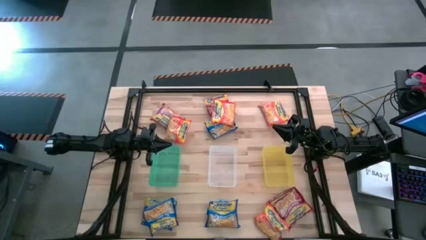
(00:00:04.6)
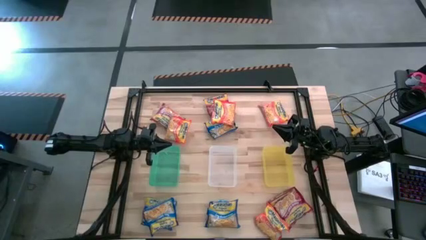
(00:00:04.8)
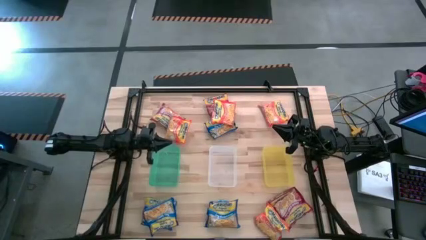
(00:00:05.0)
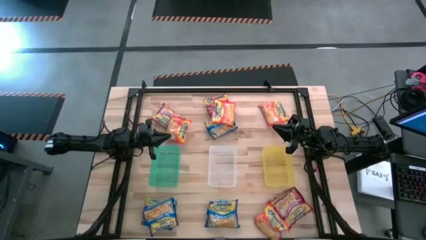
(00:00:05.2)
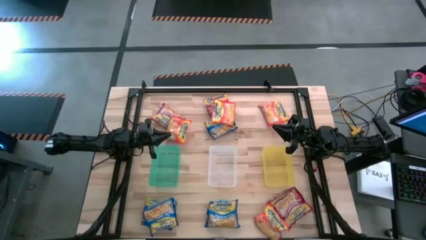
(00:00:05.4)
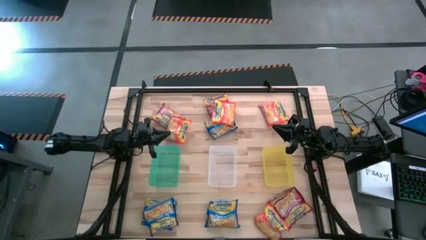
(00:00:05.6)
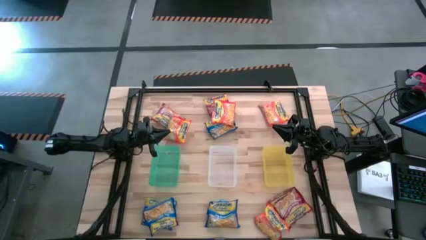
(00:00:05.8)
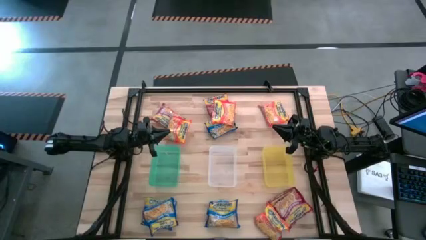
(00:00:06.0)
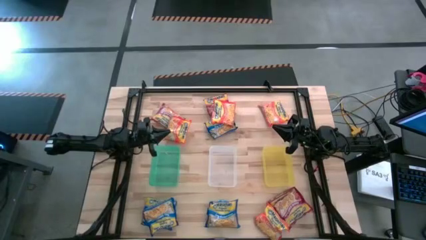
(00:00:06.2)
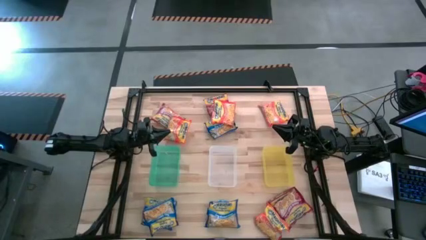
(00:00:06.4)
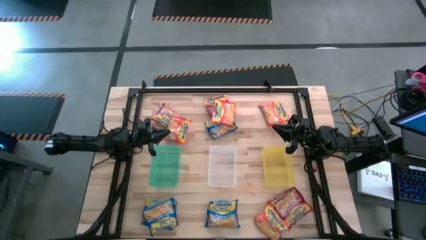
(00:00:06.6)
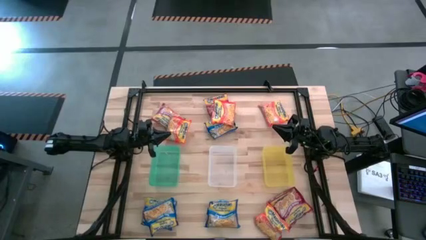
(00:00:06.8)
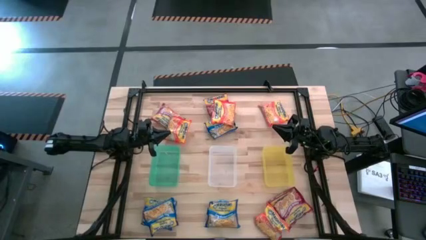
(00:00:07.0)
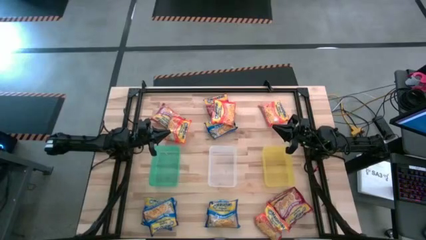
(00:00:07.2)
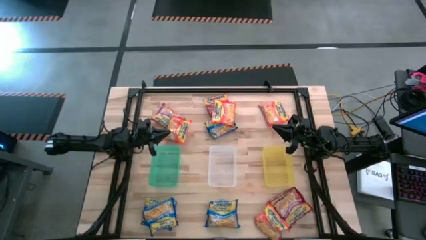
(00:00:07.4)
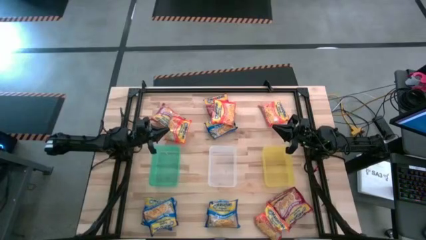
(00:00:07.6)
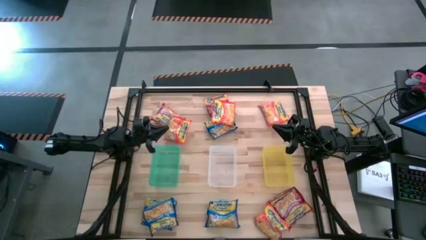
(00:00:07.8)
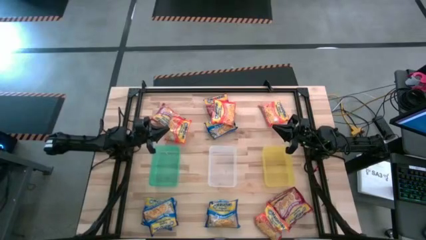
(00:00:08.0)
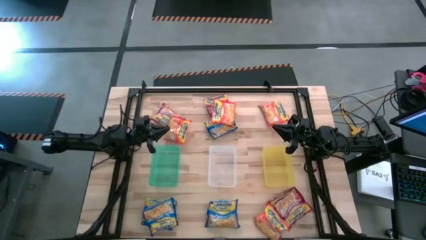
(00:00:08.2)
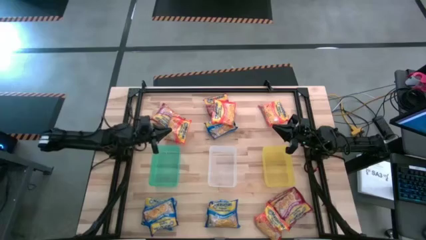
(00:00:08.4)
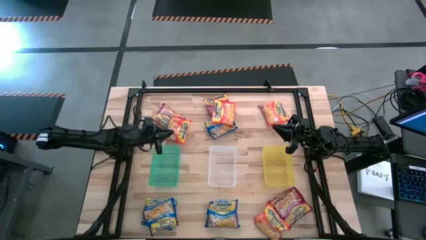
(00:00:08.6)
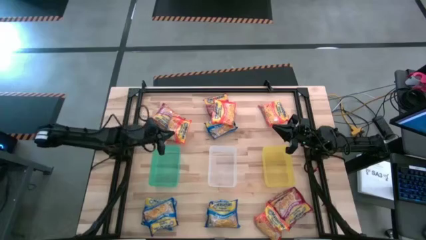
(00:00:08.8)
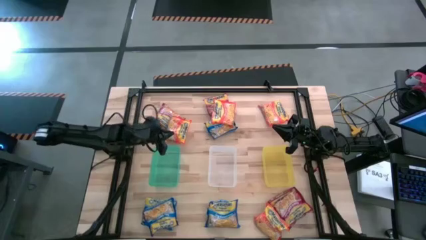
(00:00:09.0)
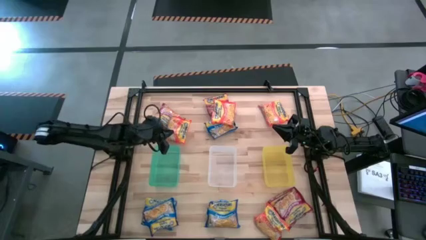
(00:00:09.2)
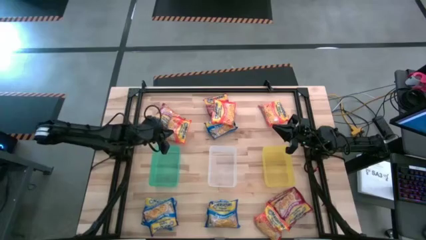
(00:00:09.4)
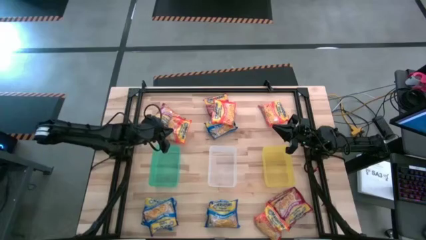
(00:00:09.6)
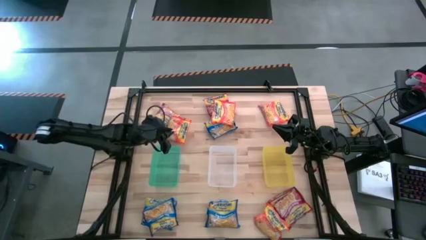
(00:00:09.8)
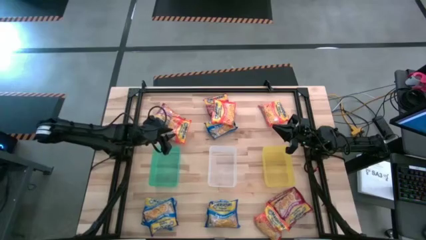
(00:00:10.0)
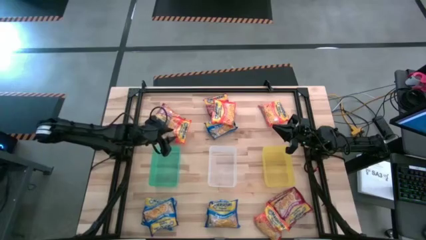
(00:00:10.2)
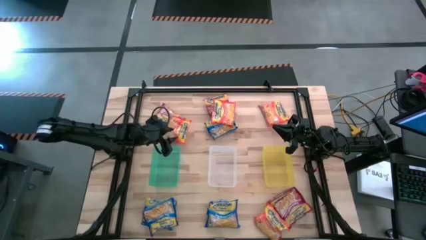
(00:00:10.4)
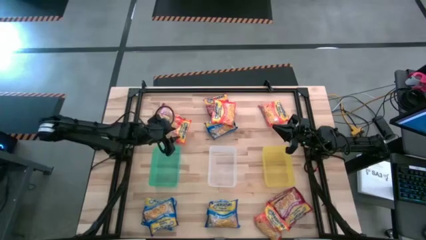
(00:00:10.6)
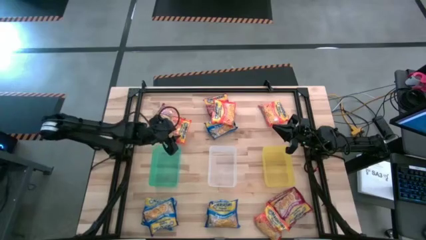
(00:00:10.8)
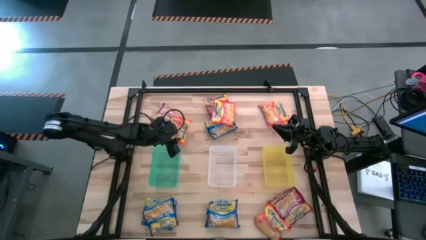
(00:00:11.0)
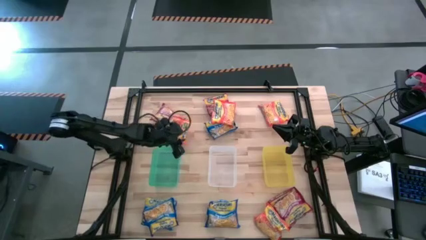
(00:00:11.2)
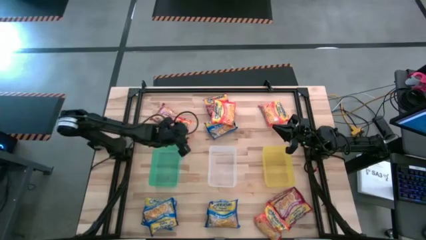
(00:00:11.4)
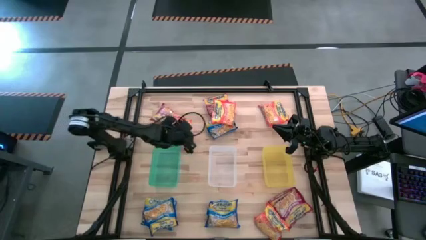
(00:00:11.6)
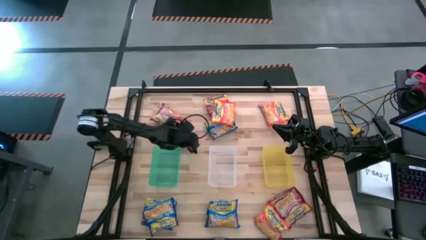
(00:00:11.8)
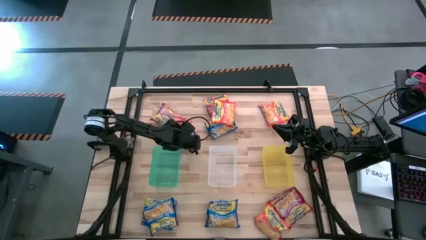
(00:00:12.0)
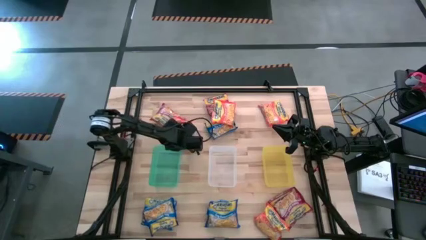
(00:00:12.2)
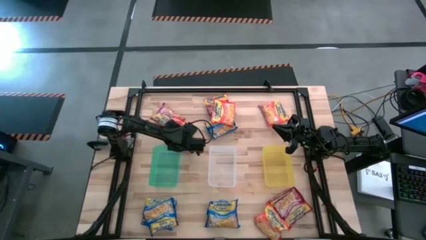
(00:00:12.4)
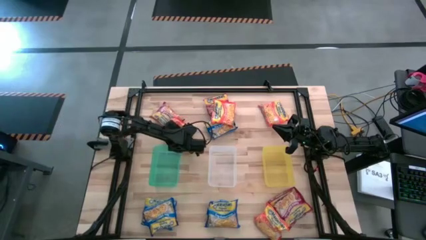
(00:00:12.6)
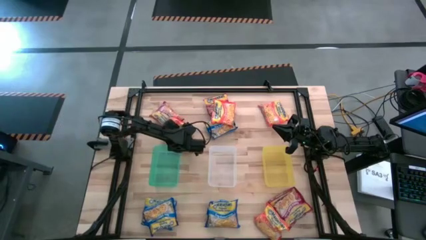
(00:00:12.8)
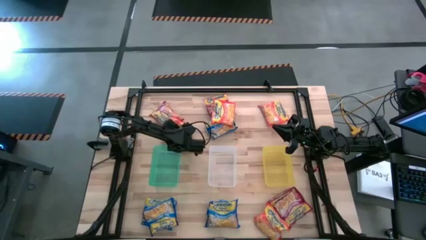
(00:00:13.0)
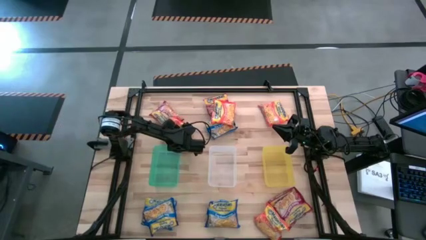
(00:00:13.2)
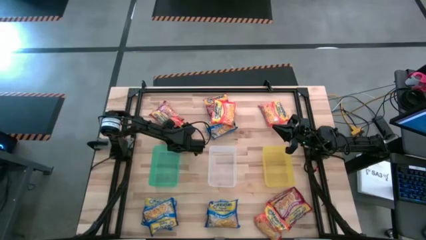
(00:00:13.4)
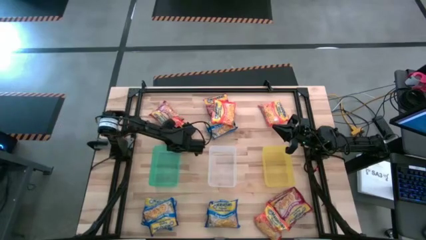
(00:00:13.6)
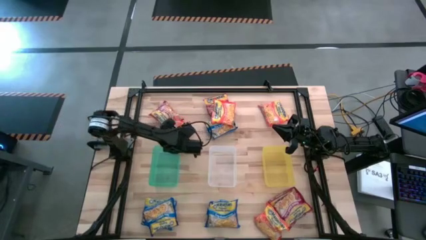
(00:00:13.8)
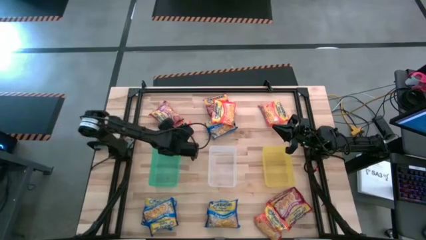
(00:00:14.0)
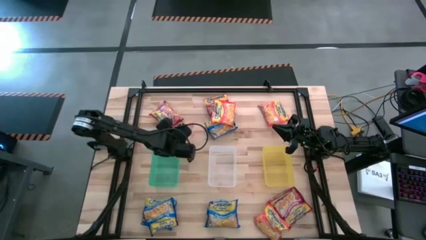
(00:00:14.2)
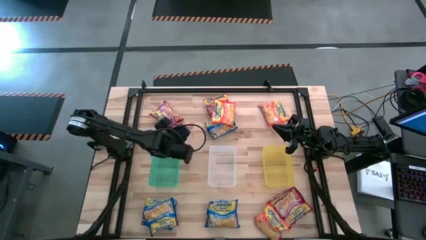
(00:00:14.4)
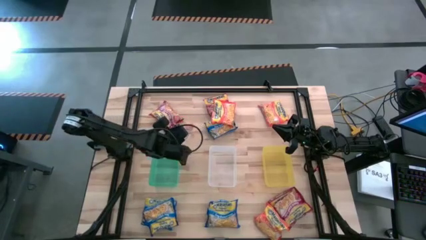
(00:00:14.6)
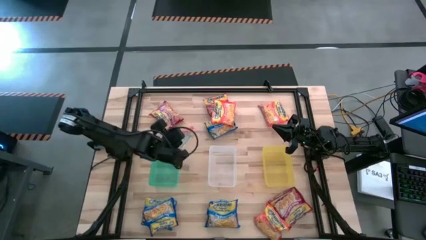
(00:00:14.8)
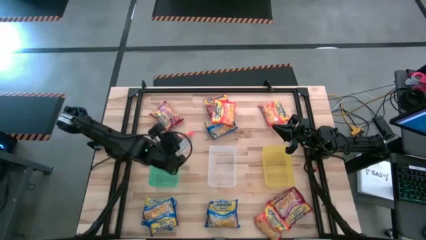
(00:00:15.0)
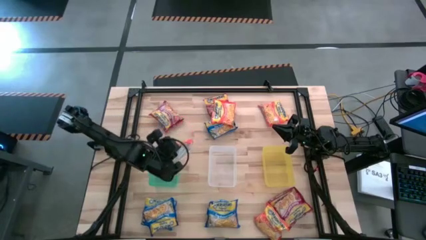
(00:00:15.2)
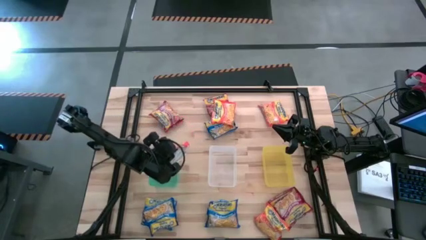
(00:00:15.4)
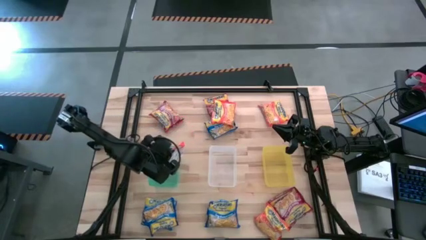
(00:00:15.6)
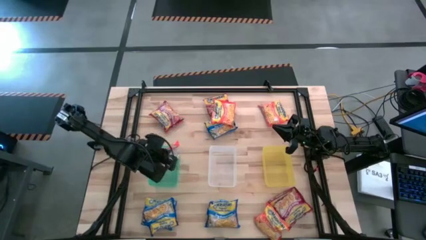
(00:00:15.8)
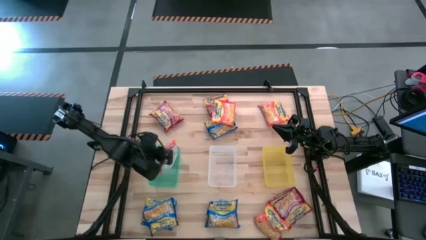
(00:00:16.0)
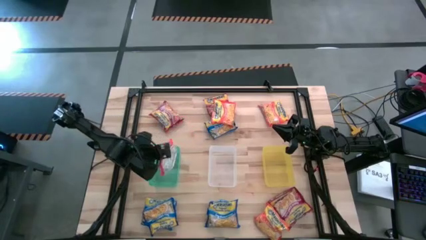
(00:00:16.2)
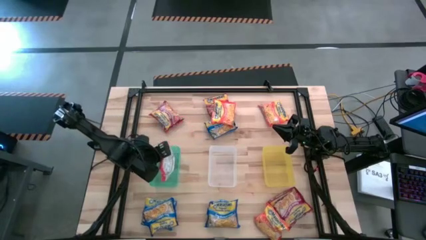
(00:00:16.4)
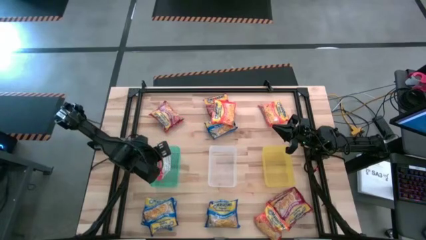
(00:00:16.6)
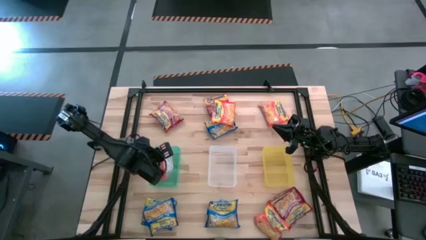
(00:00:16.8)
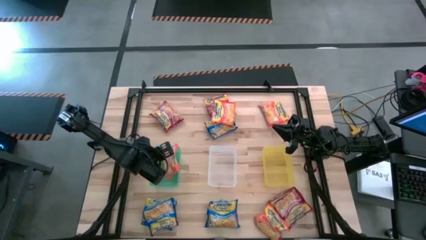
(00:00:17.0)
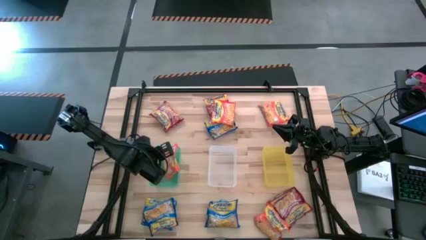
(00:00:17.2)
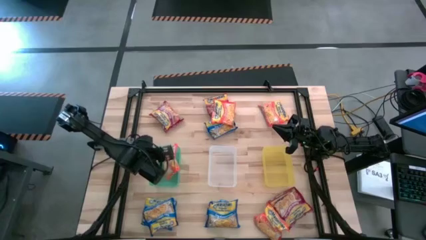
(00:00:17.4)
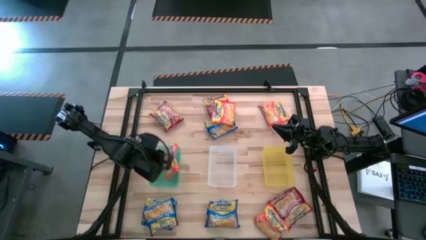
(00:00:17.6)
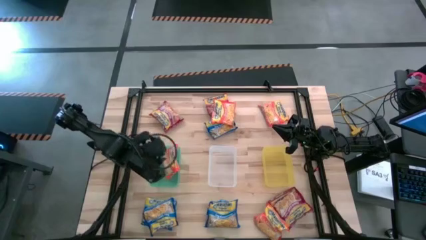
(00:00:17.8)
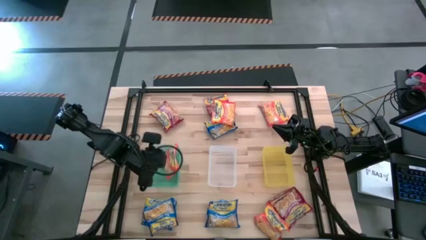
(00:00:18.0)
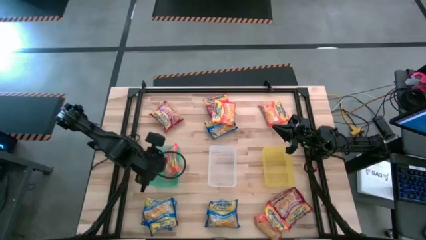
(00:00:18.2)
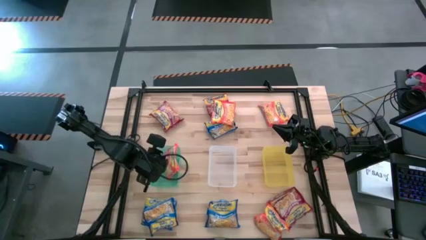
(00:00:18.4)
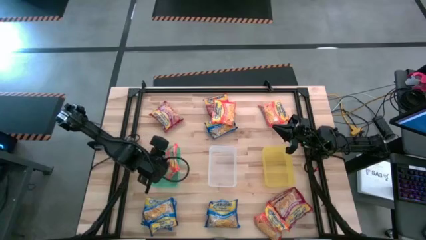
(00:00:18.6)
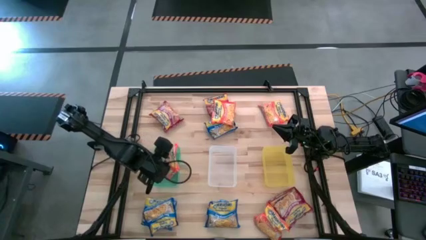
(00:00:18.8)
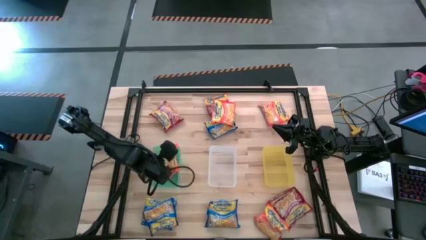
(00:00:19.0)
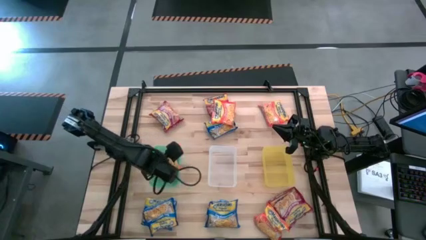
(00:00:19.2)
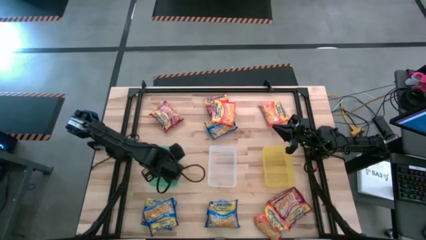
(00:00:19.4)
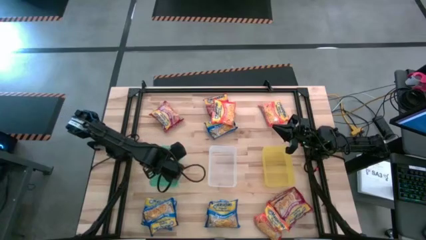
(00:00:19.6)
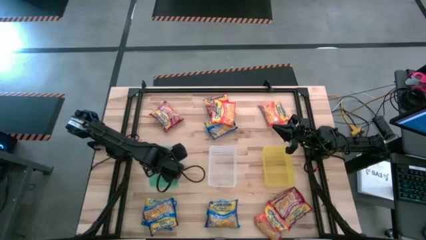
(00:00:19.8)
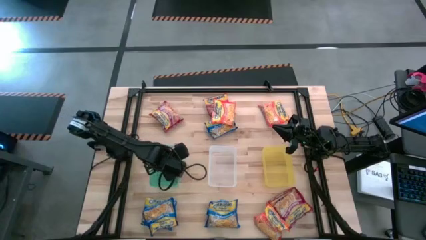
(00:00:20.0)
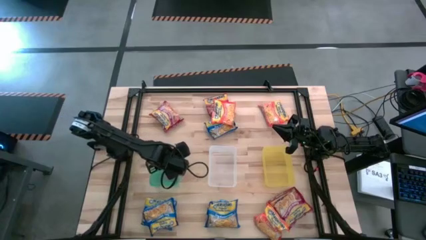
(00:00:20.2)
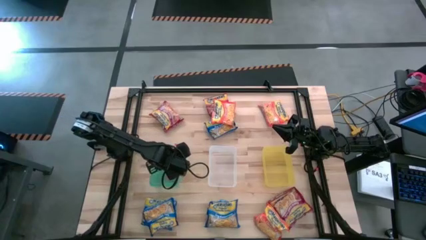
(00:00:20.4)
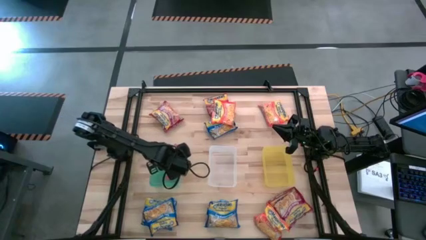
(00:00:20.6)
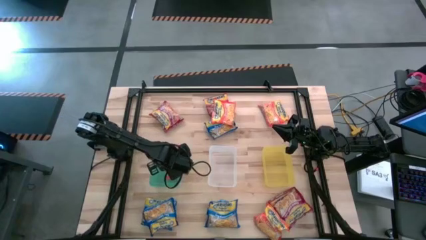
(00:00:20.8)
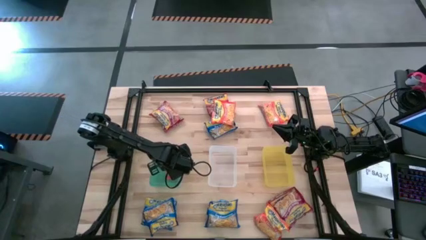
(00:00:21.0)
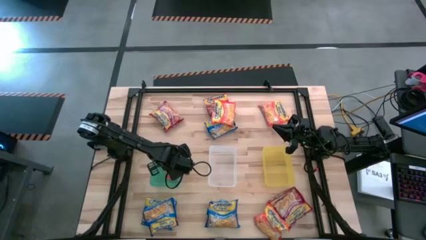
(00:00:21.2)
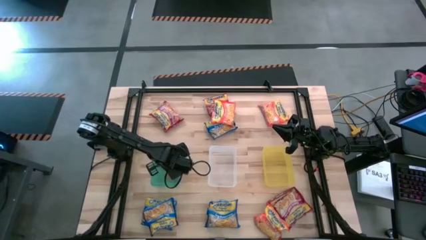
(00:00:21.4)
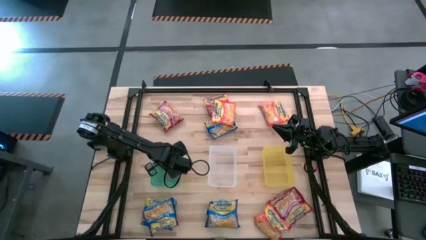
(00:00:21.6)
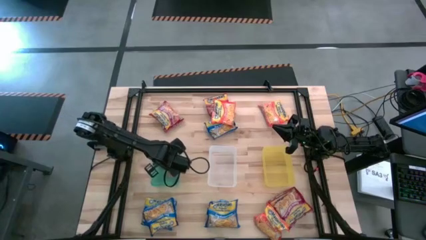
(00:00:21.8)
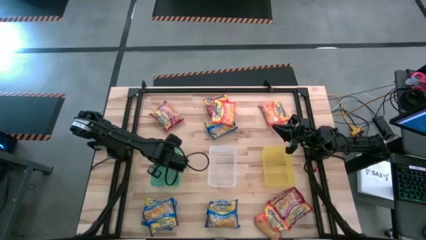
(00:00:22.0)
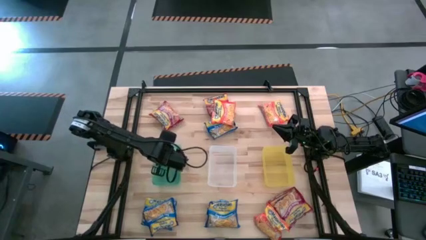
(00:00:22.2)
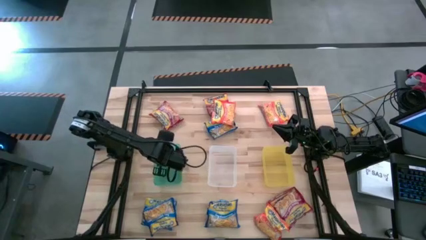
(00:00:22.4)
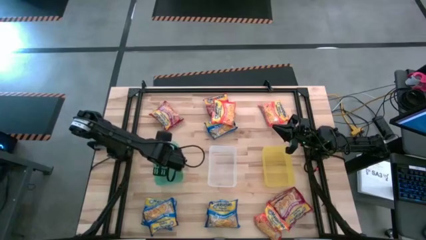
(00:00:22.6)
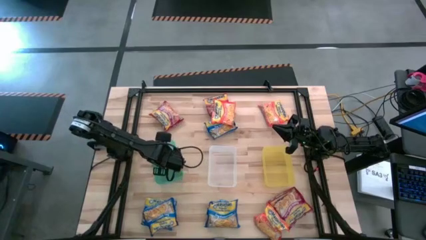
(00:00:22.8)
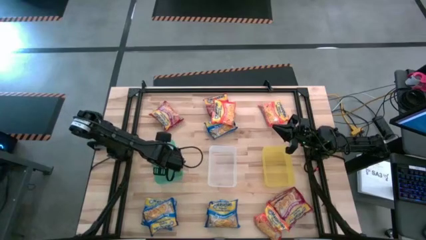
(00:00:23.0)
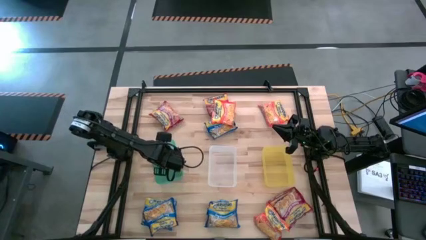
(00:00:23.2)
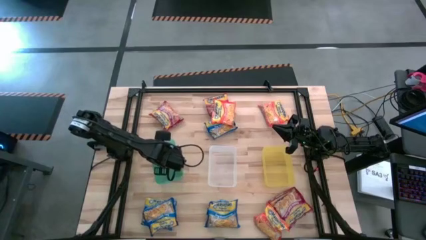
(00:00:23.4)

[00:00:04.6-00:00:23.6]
Task: Sort Maruchan noodles
Put the orange noodle pack into the green bin
